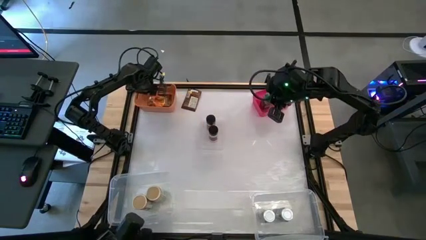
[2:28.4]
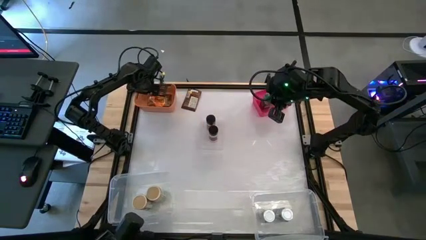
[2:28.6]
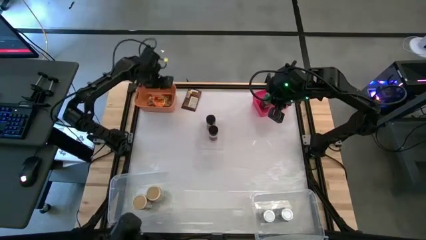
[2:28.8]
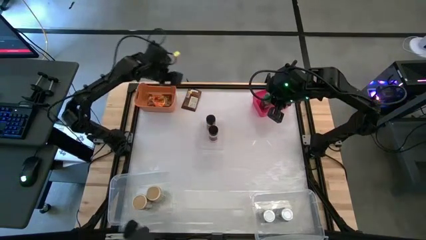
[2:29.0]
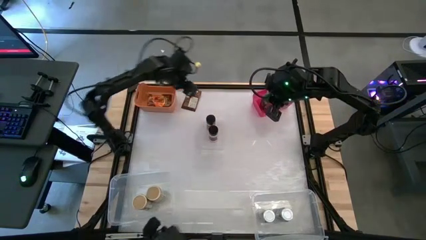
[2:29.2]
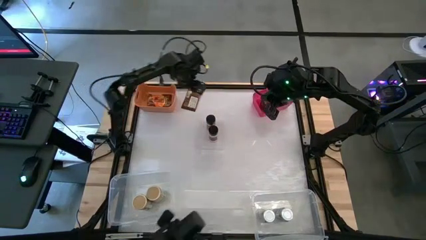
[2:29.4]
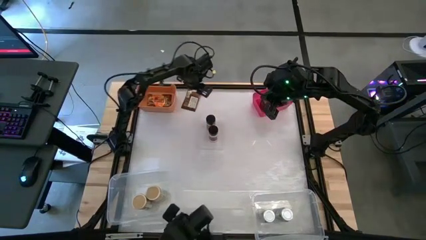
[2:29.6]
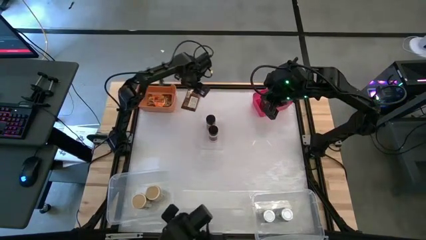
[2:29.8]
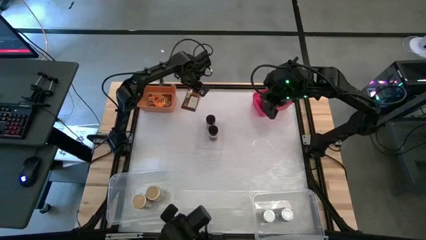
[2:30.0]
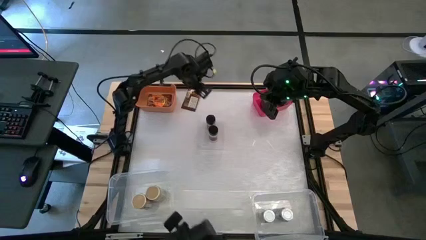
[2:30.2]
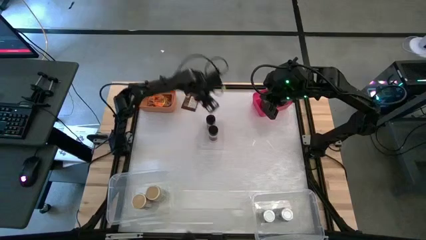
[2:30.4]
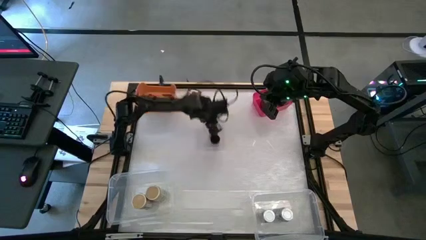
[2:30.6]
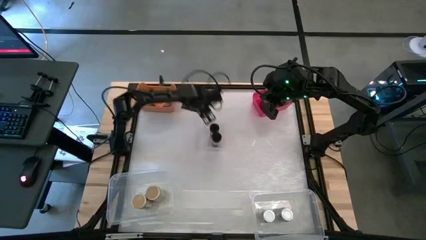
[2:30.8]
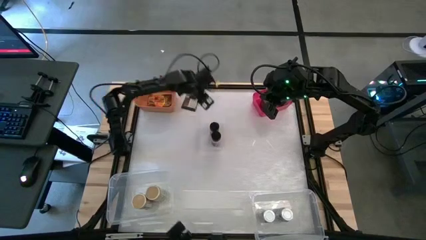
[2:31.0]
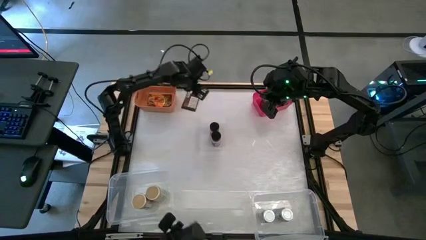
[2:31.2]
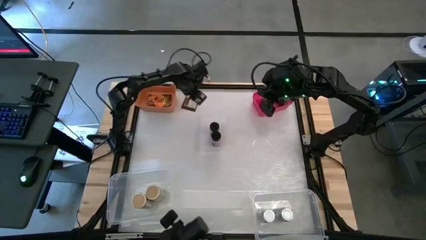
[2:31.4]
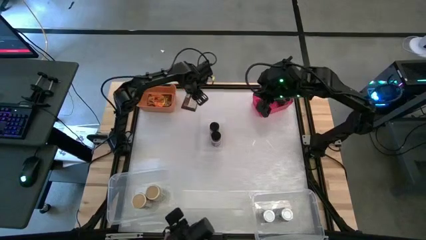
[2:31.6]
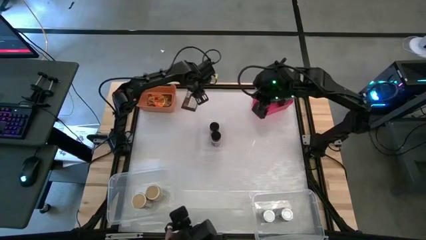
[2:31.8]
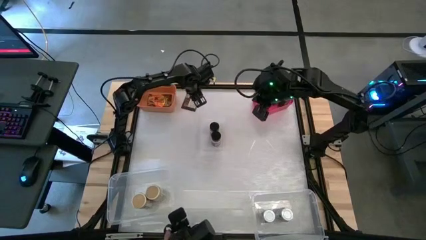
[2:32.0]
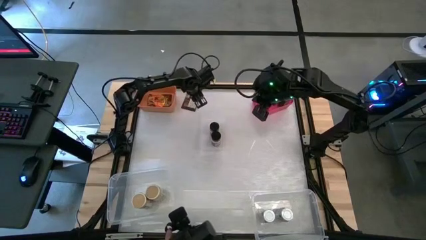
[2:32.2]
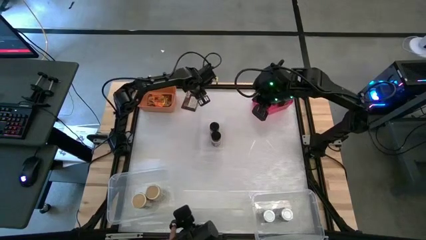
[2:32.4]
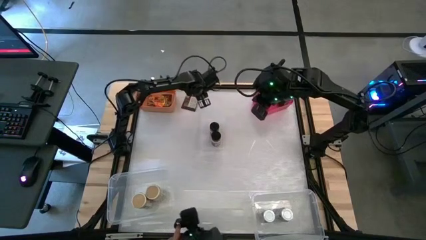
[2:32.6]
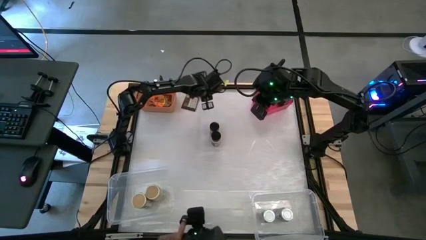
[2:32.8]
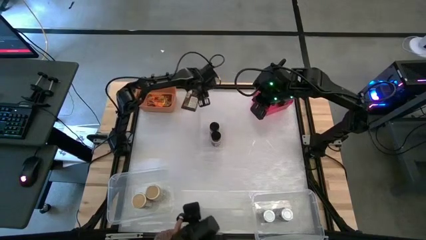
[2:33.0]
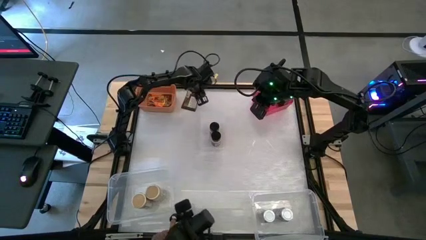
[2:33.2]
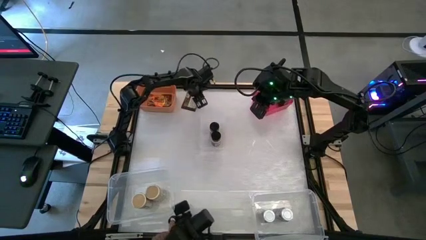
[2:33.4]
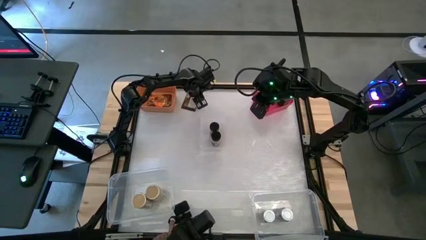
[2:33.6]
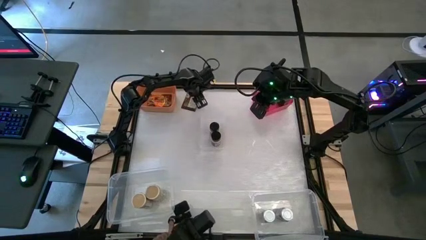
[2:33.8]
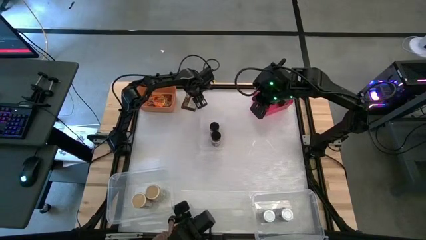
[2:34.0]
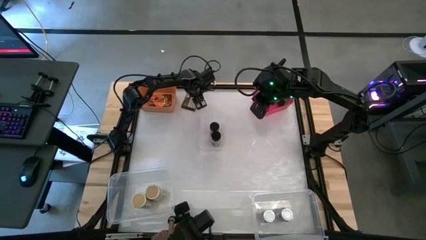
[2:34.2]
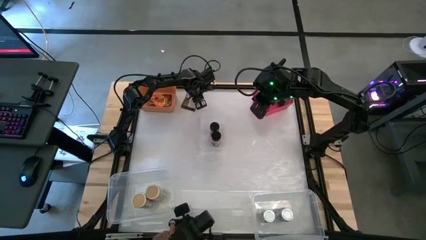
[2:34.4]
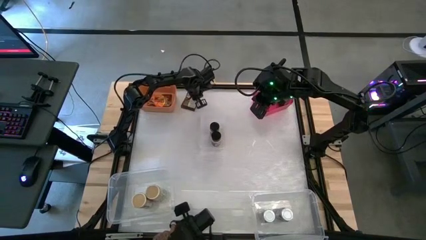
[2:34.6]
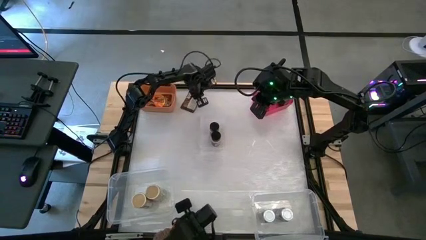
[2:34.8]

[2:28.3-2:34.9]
Task: Sort spices by type
Put the orange seasoning pack into the orange bin

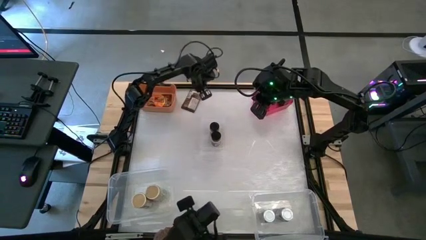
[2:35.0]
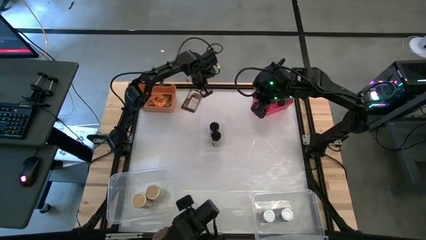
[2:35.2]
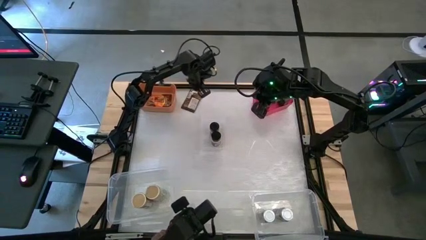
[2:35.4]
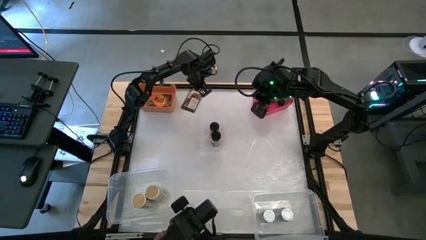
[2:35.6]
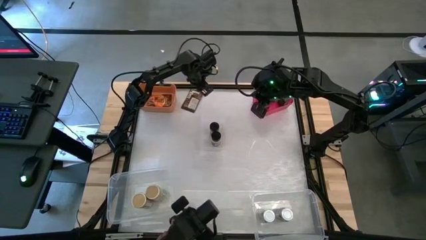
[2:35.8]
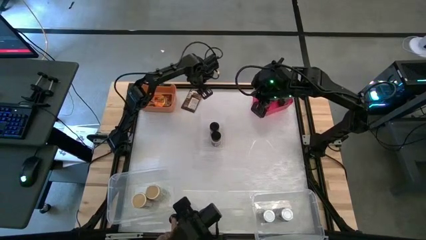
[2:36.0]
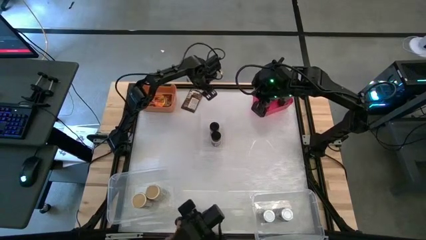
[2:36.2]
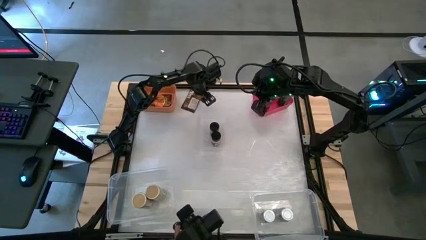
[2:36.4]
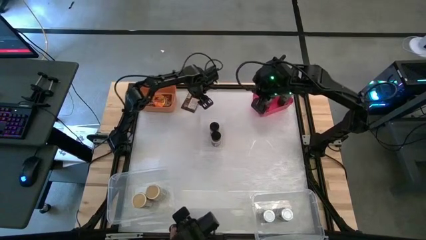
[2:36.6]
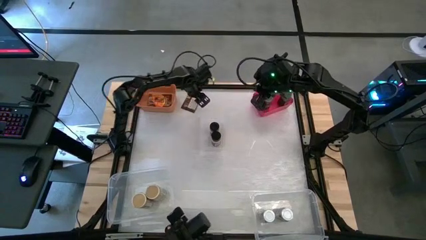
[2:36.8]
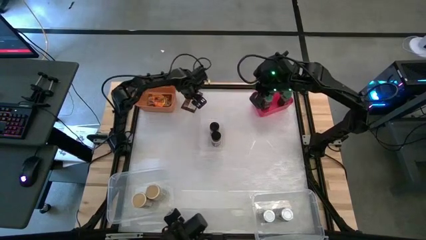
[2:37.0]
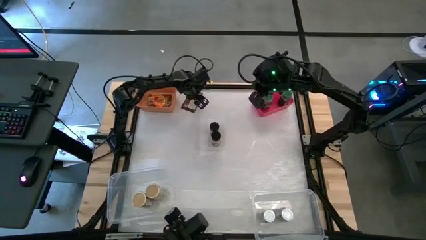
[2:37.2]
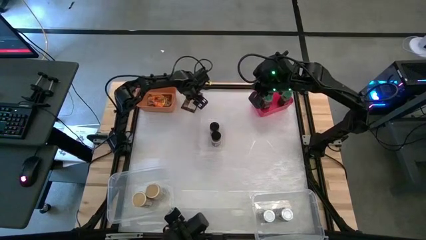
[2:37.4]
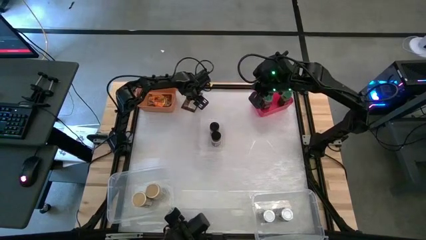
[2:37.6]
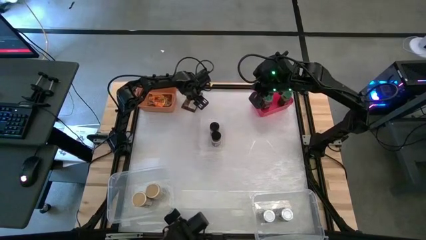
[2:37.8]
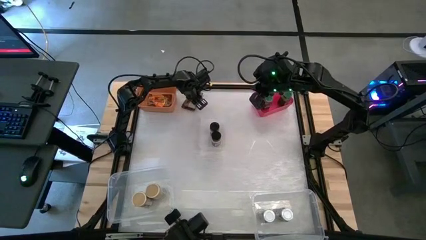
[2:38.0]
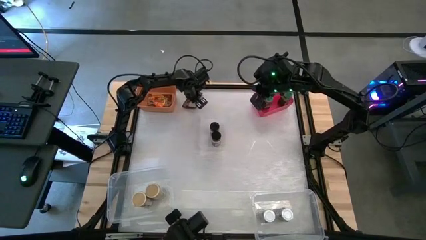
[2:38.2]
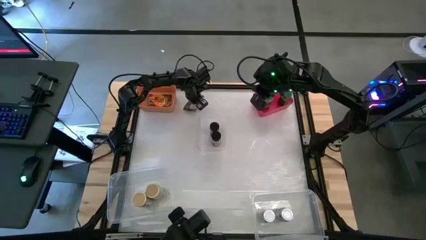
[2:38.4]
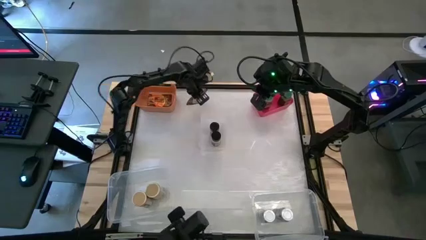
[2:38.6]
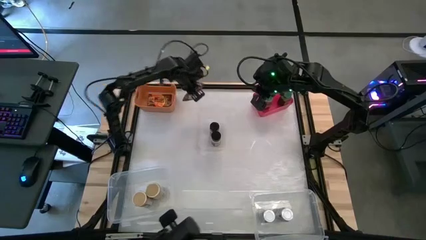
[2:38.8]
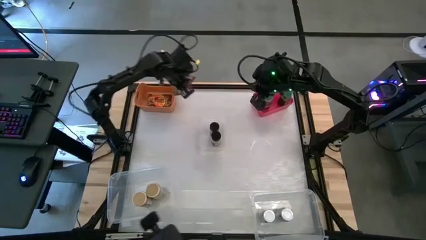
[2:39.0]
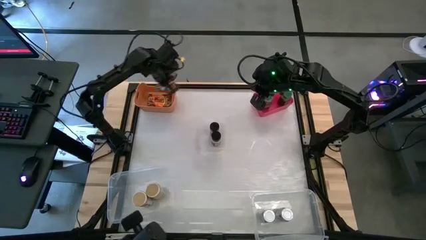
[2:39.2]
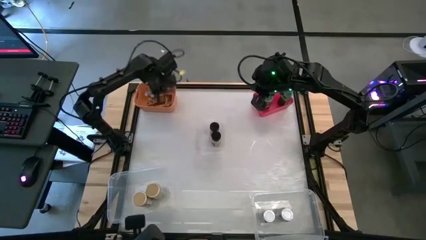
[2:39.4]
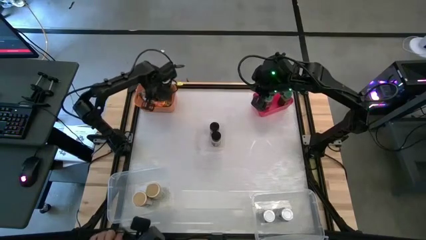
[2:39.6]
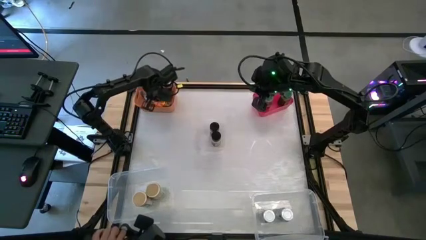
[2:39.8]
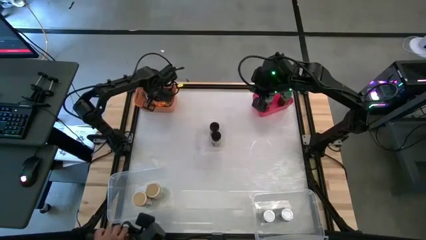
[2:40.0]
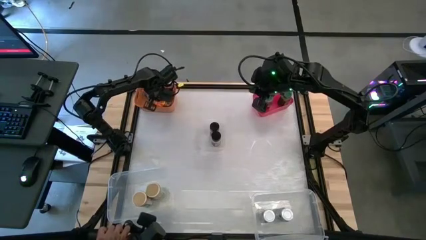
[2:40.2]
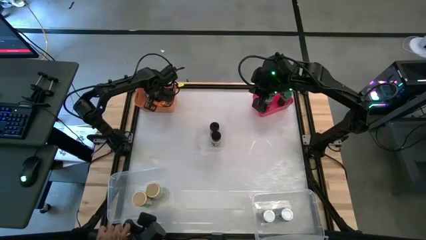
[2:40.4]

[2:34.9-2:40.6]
Put the orange seasoning pack into the orange bin

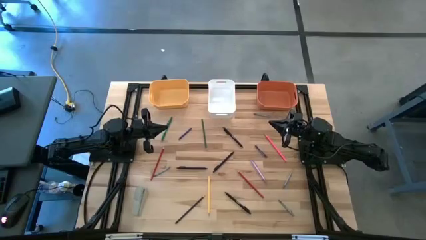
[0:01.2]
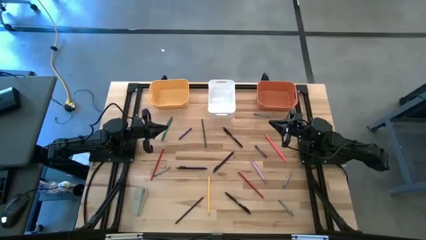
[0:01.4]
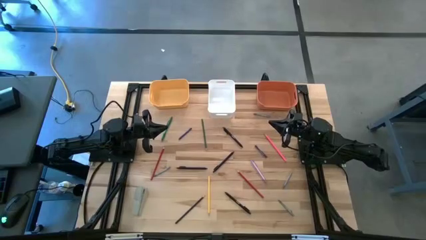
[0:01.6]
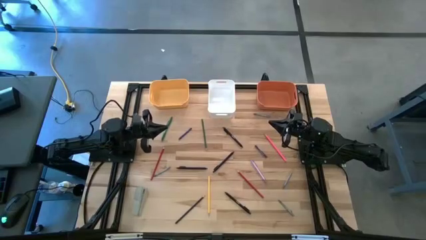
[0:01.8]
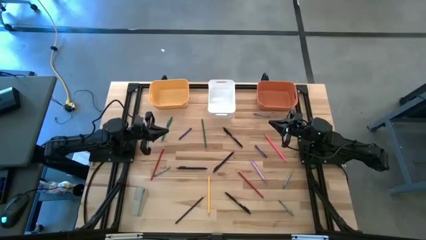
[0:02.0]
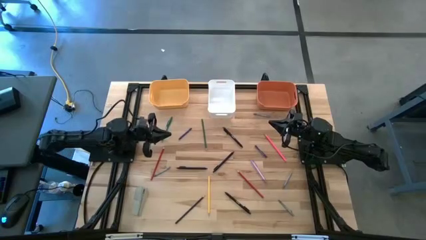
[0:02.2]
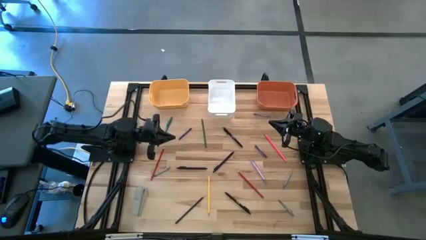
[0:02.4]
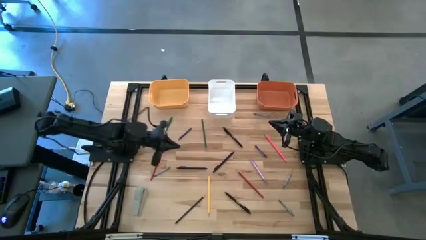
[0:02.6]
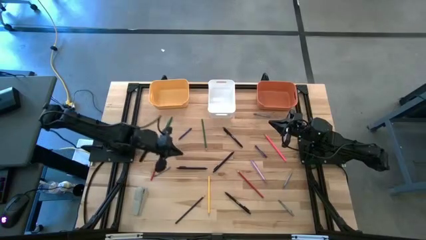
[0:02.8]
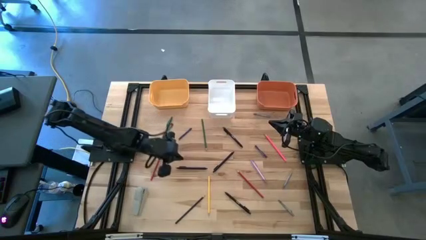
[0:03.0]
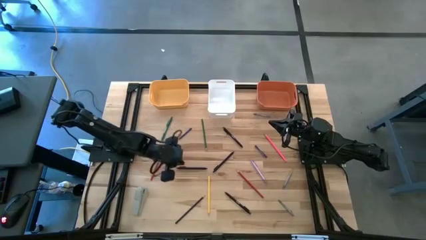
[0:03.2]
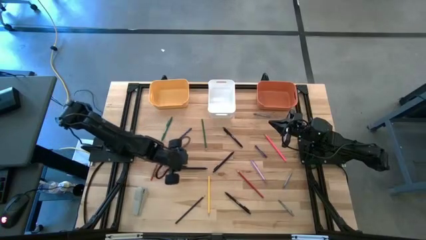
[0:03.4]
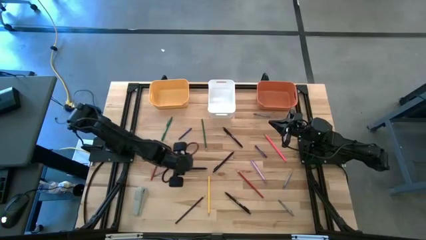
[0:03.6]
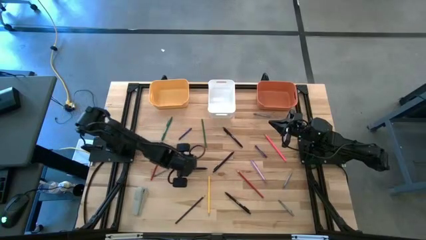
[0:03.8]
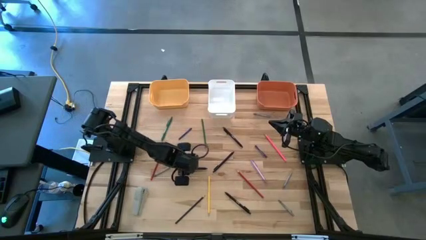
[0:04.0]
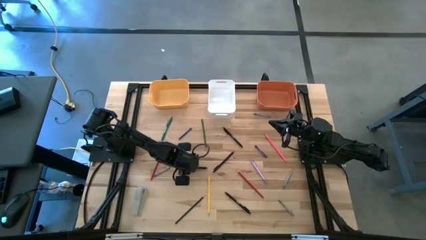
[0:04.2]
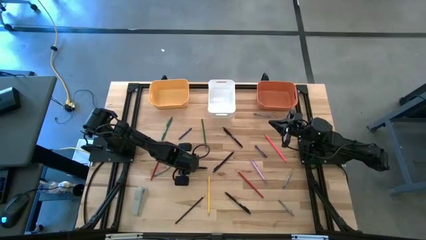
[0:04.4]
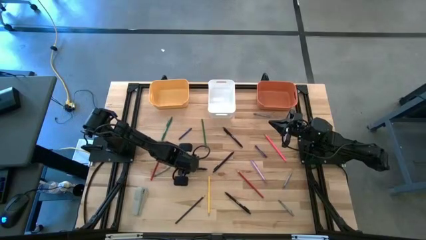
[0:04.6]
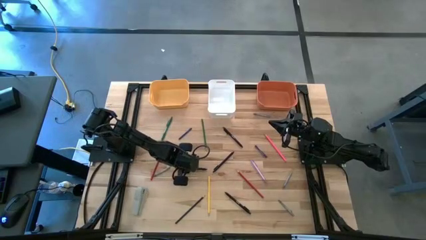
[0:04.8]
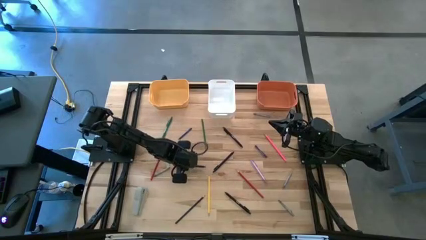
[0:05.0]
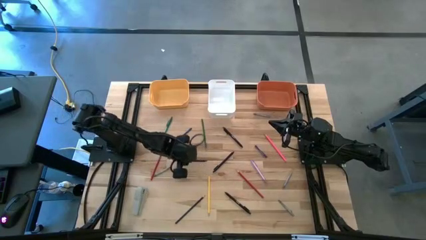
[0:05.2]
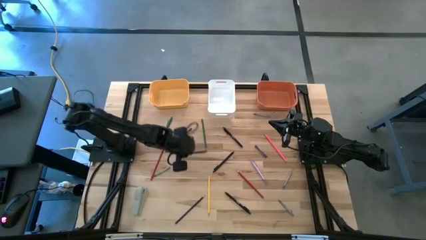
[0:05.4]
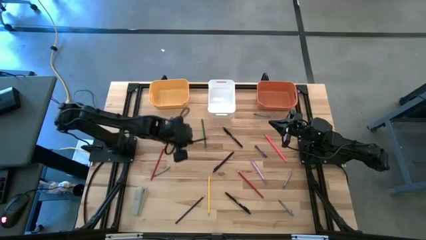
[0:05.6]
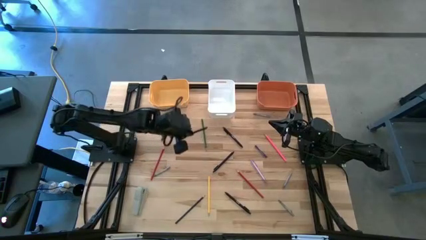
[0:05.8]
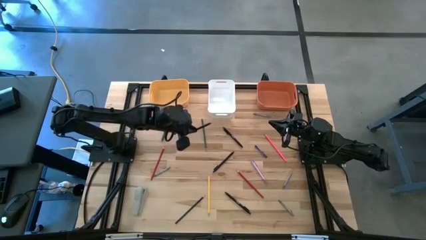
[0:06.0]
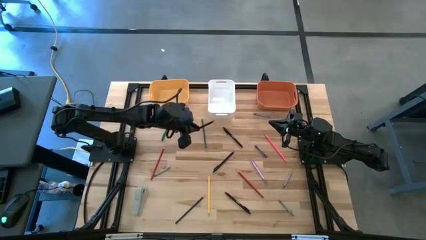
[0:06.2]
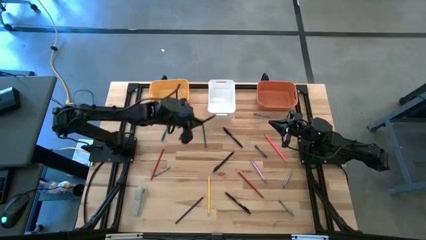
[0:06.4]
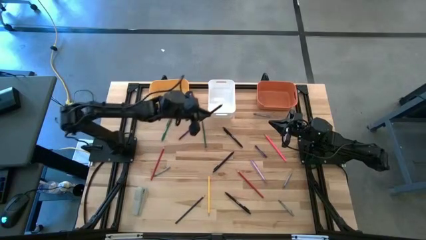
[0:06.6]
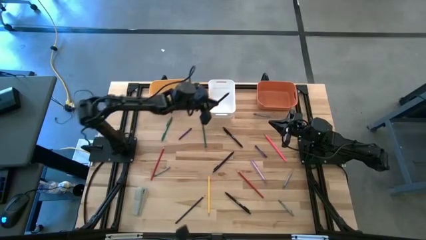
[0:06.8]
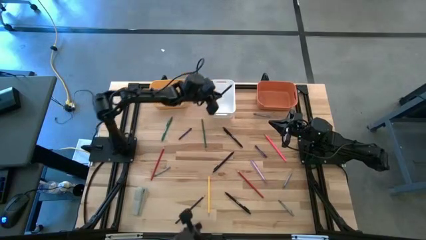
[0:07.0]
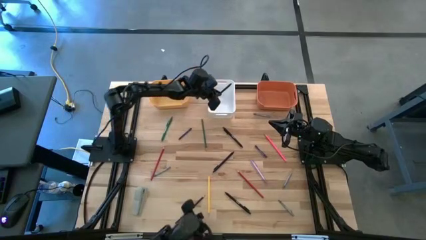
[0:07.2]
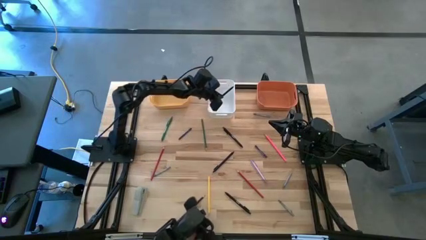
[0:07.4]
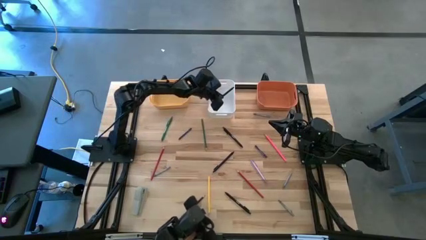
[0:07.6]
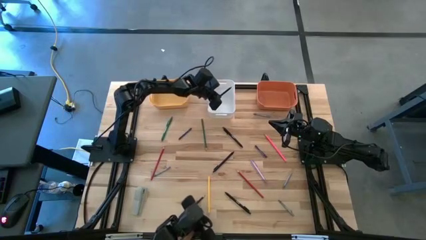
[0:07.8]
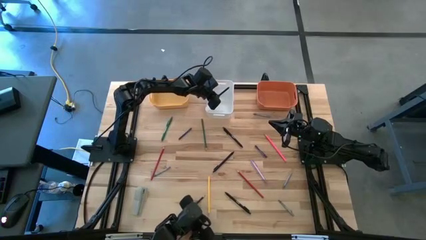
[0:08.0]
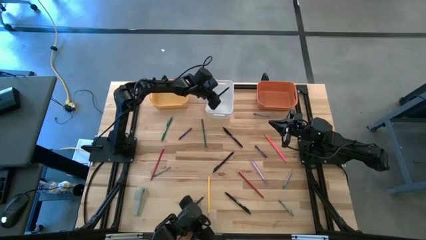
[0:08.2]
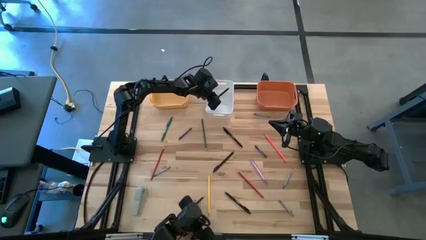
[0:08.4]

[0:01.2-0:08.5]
Task: Sort crayons/erasers/pens/pencils in bins
Put the black pen into the white bin
